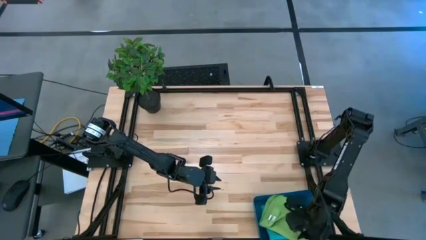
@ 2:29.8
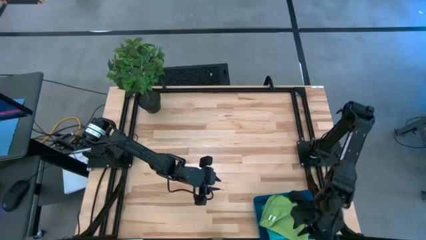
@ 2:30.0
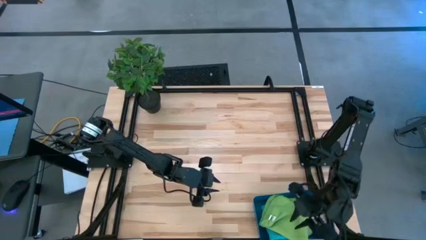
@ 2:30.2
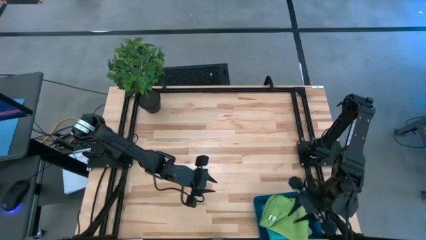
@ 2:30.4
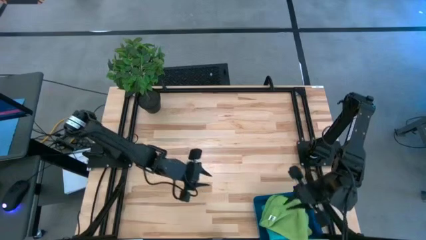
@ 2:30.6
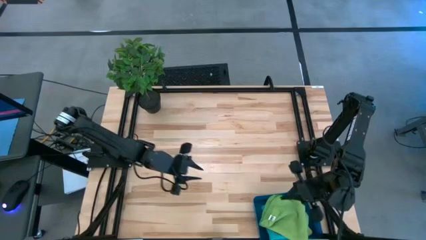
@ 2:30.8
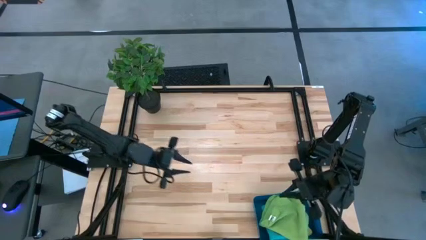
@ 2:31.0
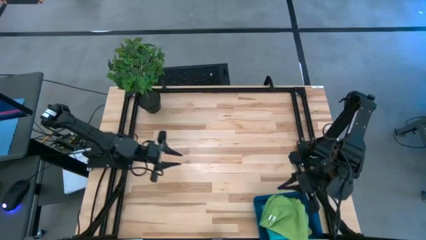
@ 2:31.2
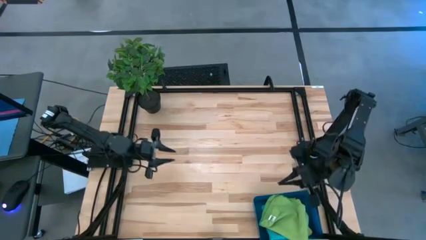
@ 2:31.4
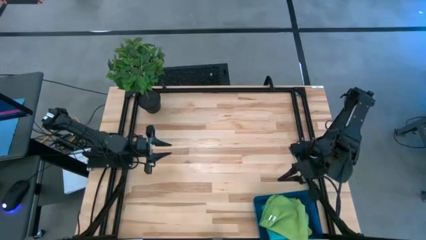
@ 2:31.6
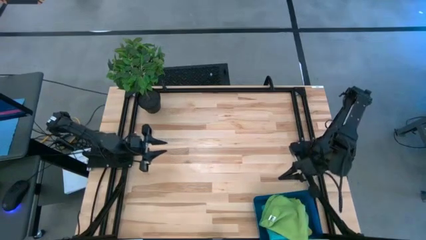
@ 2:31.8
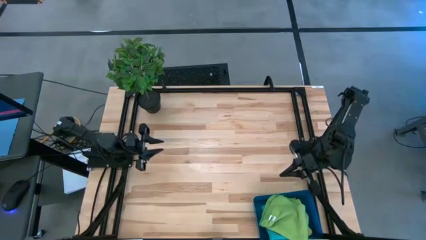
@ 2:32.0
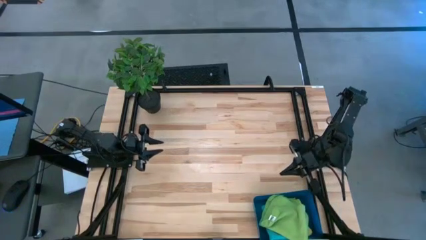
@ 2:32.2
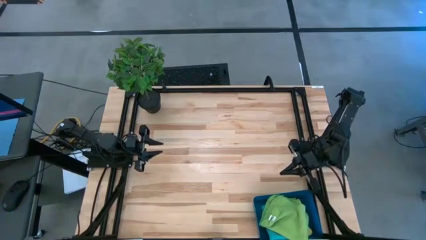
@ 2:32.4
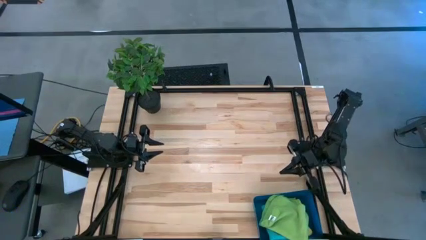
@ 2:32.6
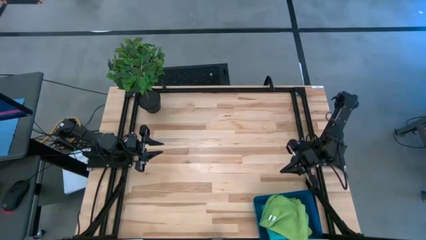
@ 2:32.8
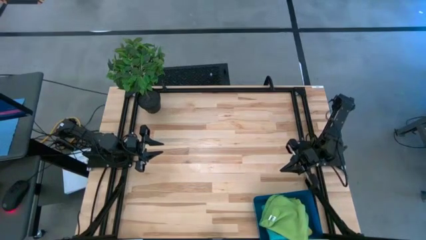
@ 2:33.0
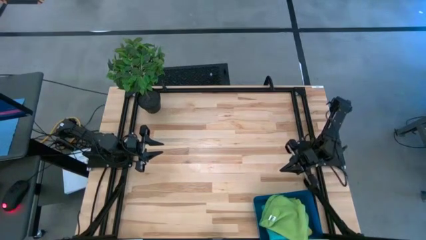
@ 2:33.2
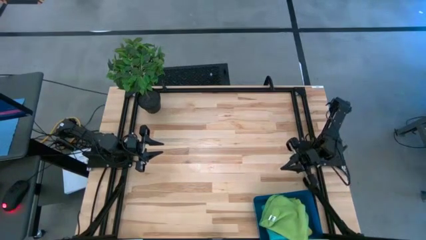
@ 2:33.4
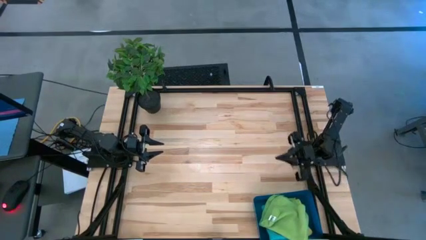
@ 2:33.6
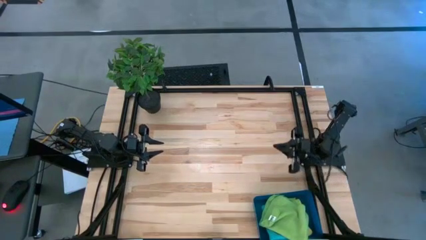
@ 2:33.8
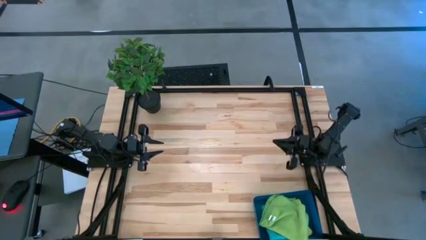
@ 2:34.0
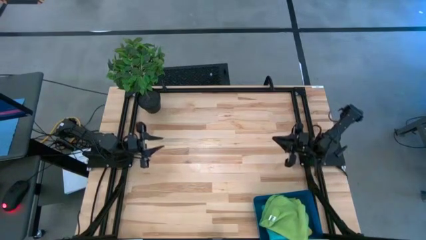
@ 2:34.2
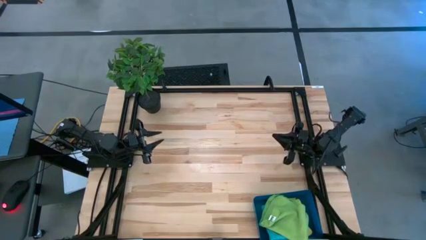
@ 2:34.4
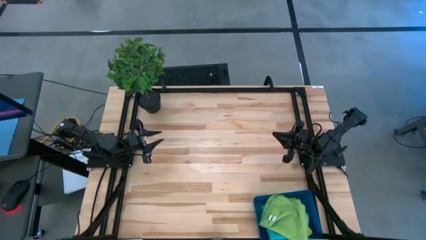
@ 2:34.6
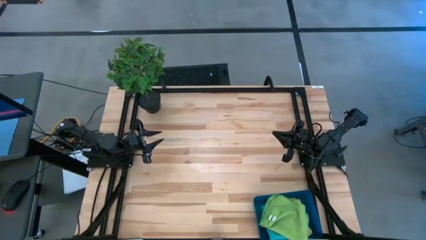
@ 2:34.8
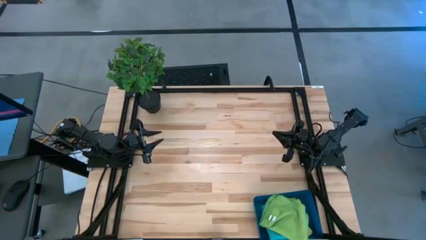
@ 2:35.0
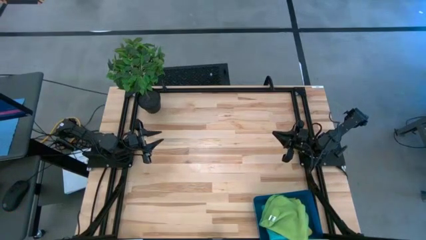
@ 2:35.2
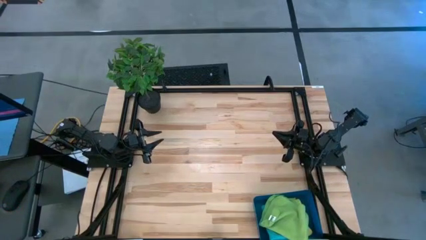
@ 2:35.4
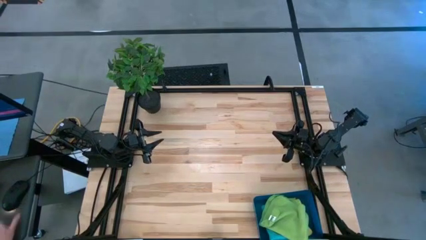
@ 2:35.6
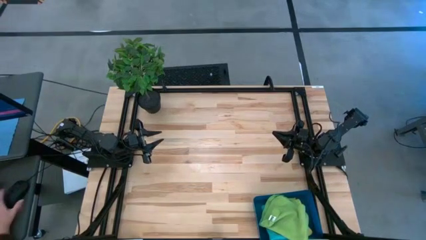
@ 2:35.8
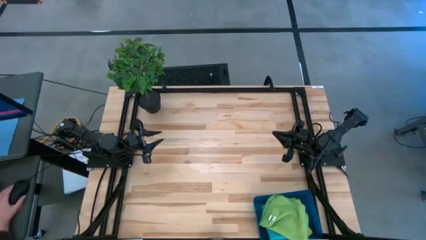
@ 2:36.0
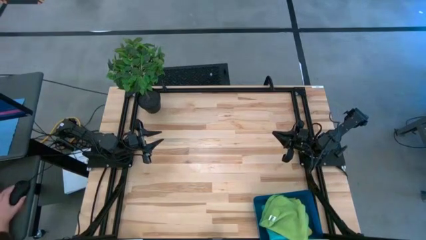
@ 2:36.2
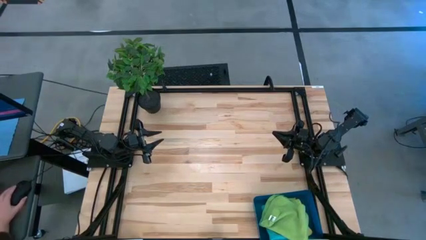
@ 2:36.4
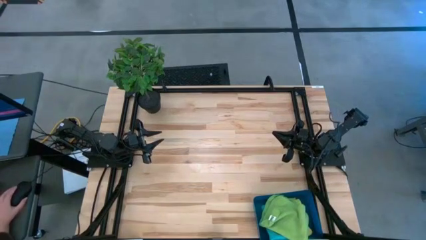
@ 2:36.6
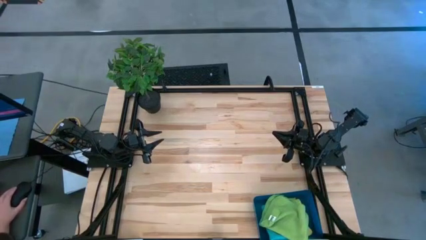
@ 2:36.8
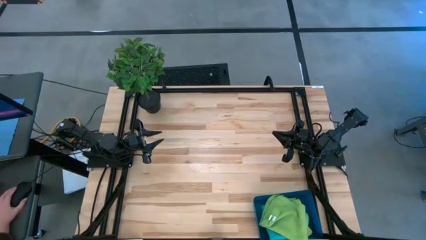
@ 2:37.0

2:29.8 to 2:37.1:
Task: Fold microfiber towels
Return to Home Position

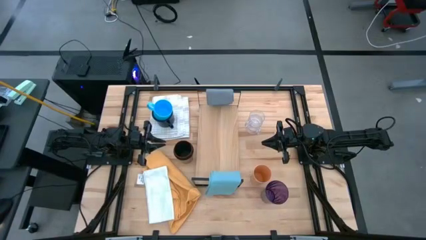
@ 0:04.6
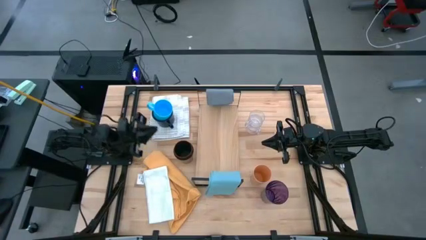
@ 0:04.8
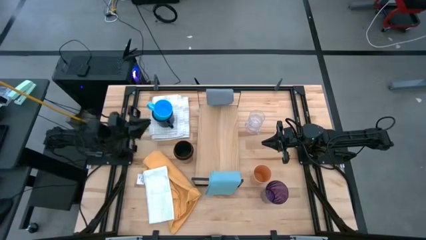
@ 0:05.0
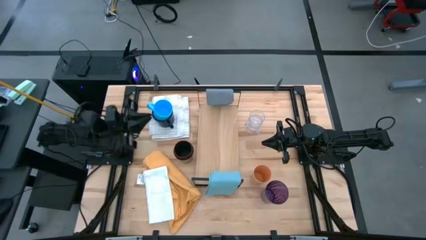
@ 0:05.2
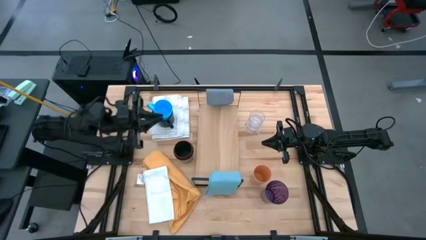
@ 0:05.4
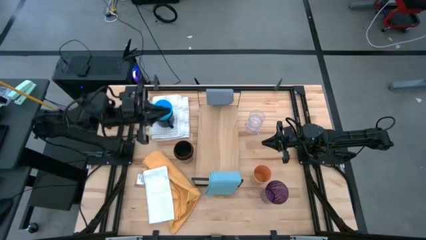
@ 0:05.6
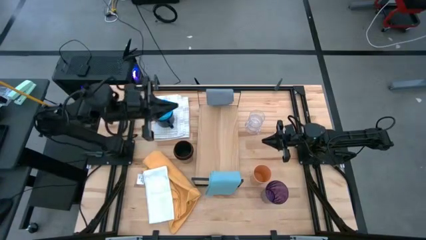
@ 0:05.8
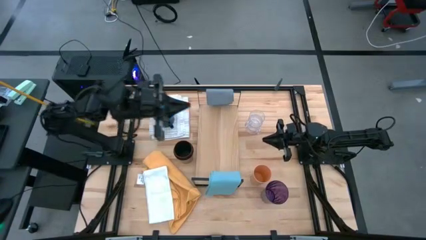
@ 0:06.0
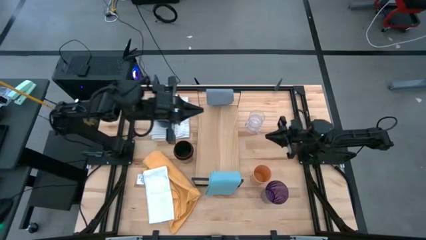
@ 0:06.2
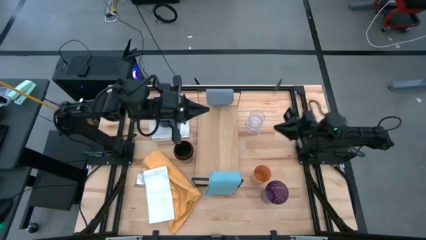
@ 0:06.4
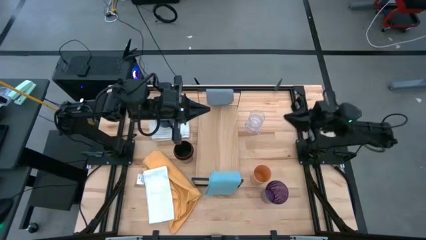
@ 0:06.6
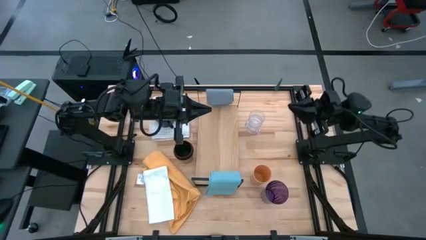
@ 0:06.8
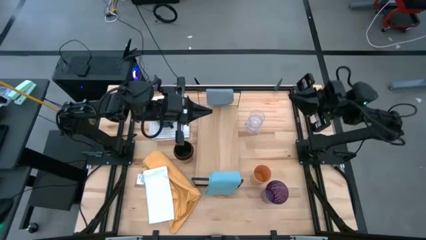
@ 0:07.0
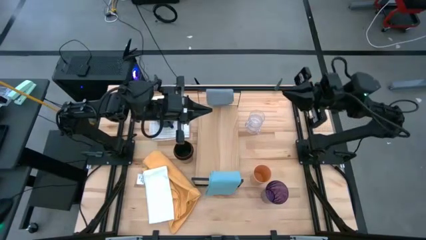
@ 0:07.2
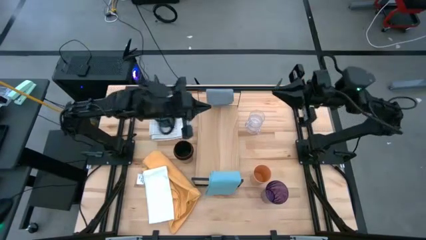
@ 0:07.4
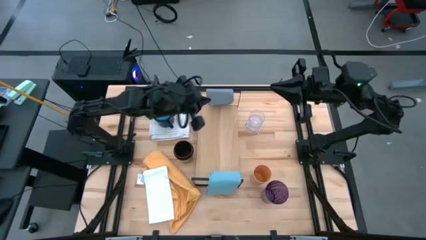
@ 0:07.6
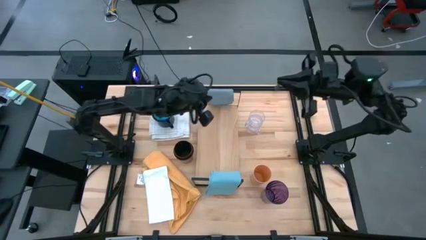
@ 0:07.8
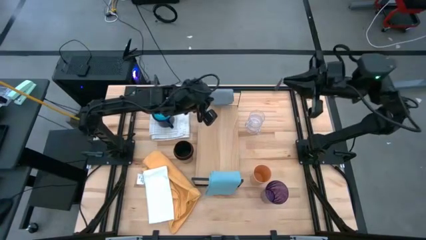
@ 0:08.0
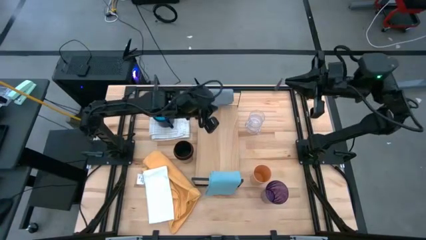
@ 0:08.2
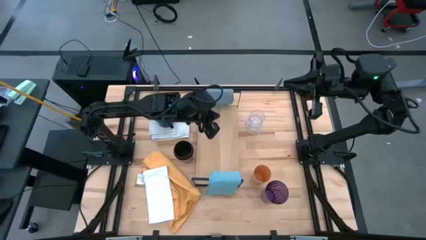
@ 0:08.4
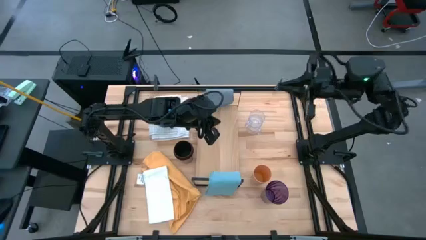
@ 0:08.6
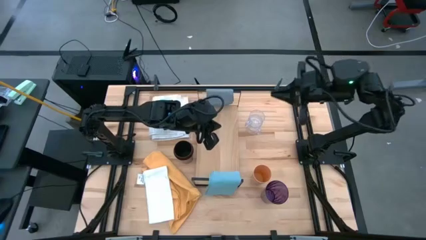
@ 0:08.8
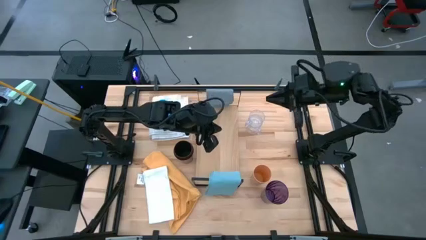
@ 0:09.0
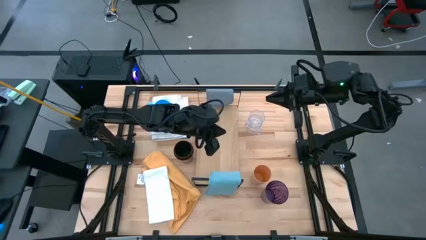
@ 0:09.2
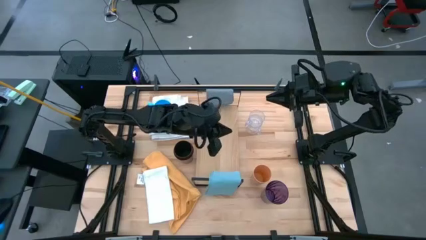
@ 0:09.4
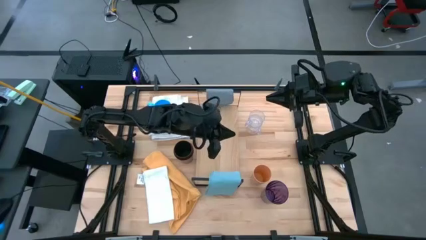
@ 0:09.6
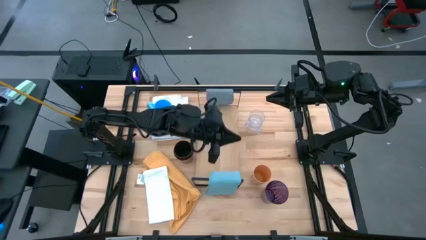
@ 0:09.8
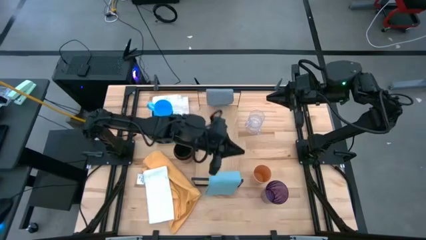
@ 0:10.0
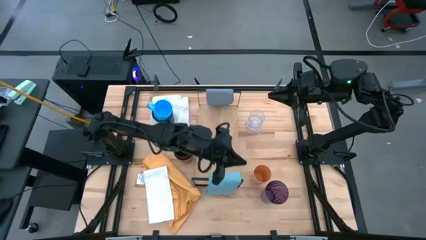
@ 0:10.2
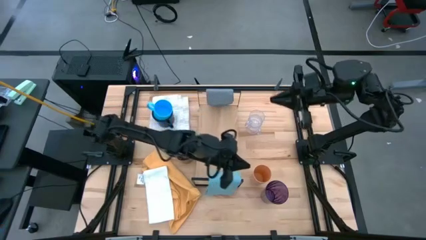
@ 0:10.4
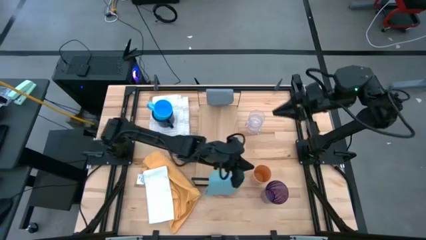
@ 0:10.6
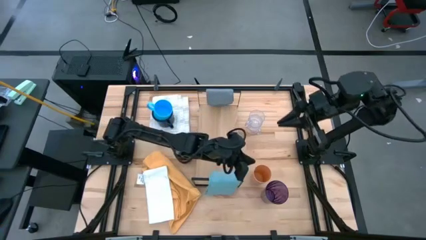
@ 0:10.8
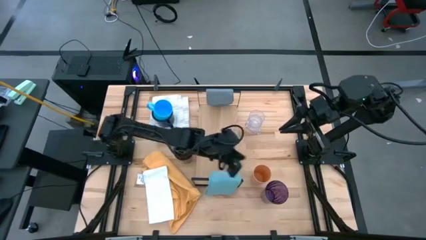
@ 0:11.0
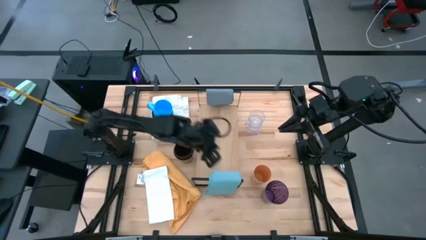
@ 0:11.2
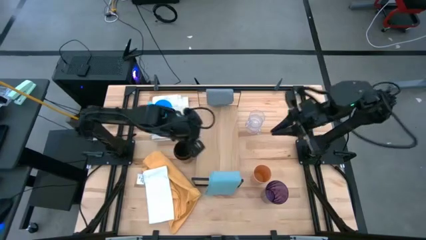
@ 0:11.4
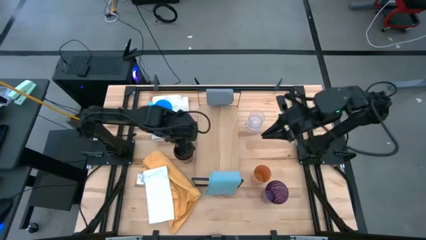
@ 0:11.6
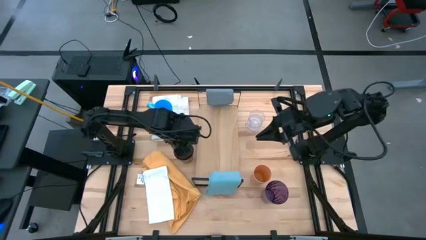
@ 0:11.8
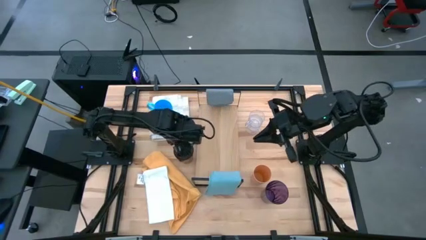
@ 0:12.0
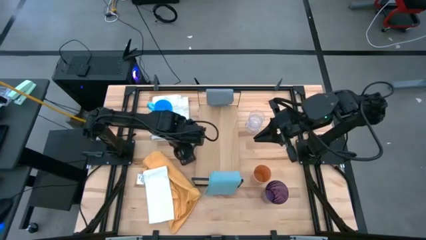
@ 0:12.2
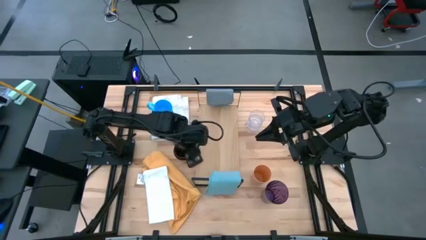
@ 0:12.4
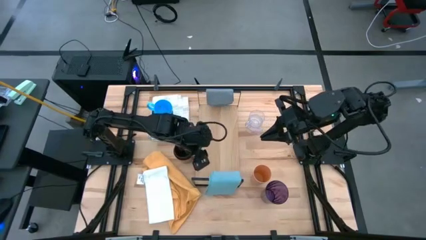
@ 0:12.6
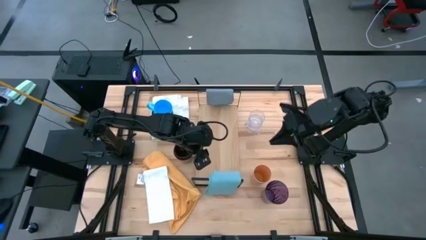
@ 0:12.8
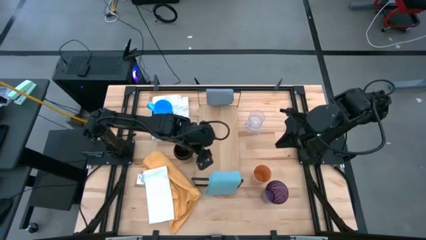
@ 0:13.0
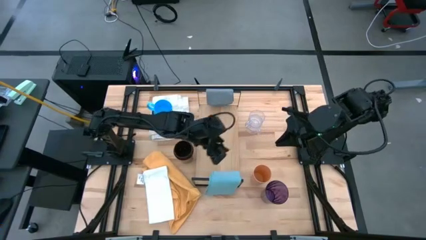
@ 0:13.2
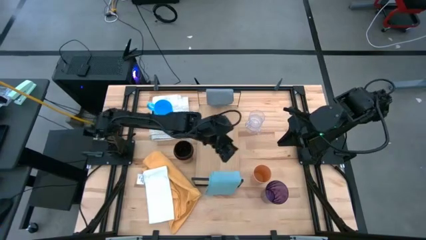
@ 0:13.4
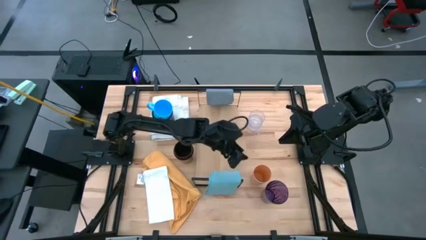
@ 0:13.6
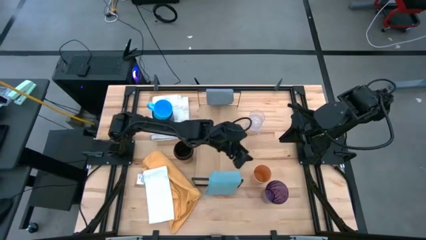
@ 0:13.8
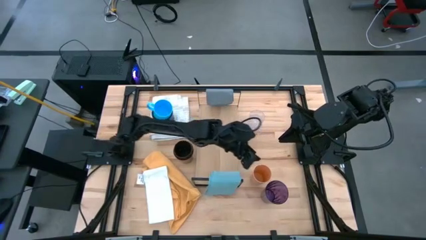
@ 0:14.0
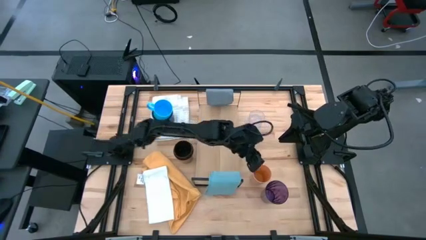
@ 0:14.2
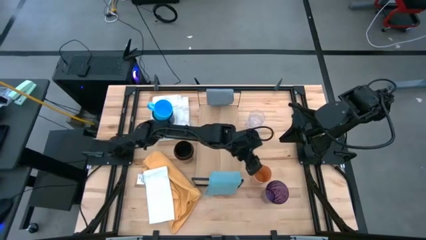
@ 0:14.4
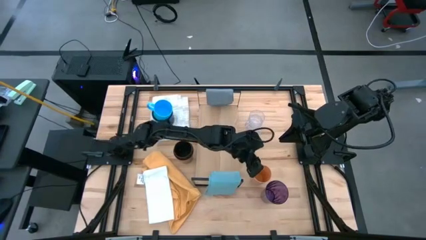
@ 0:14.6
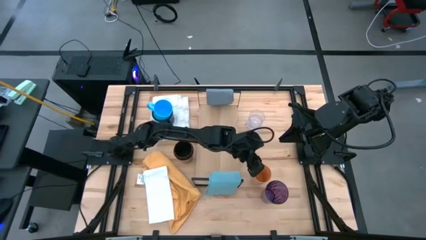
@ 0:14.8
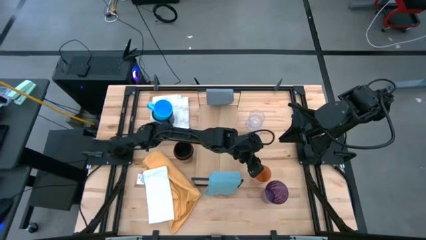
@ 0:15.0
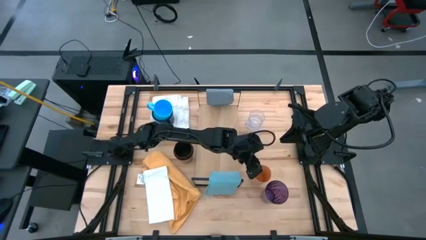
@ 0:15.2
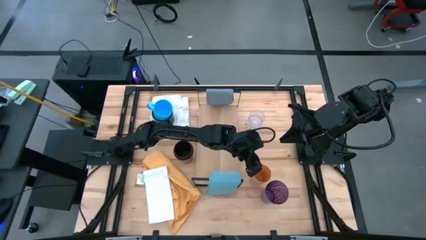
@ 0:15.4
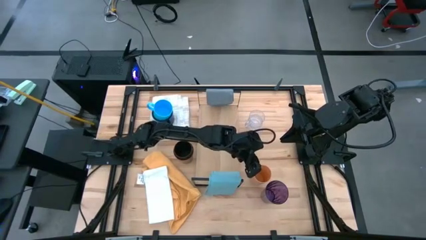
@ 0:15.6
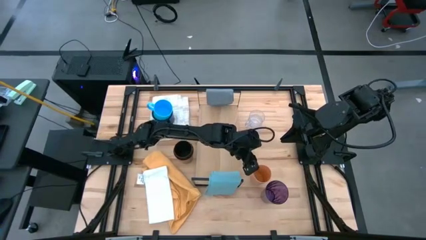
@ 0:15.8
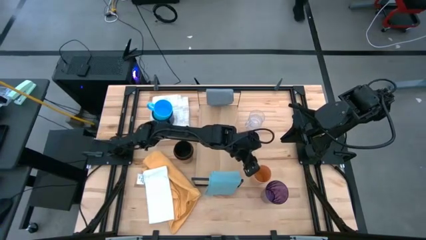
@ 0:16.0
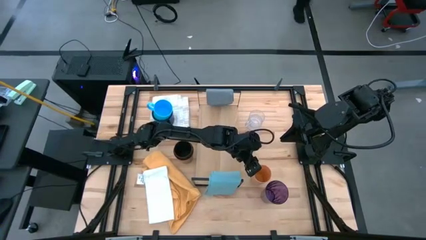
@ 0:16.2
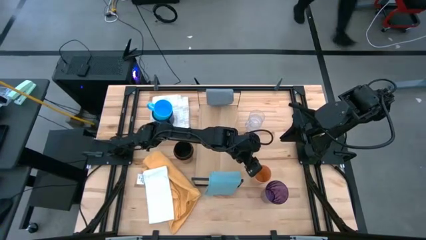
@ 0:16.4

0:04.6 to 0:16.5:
Task: Stack small to large cups/mugs on shelf
Put the orange cup on the shelf
